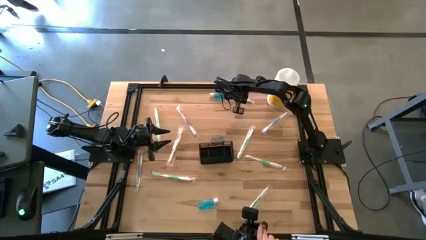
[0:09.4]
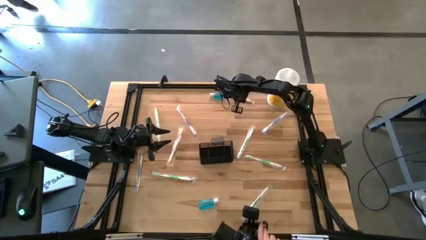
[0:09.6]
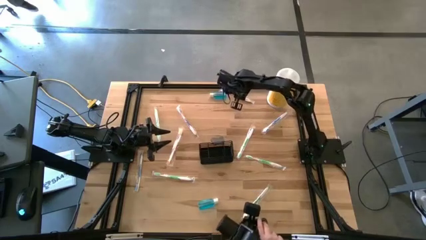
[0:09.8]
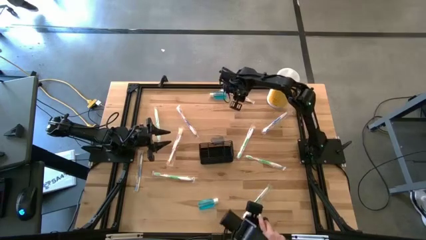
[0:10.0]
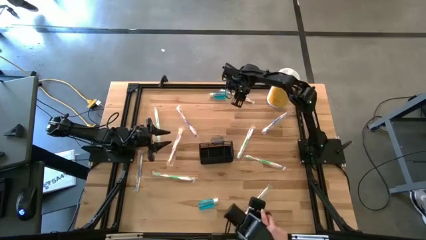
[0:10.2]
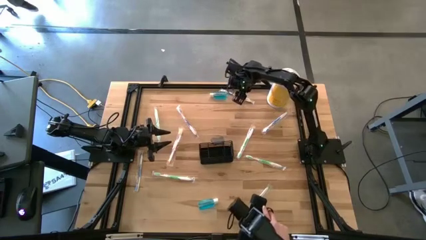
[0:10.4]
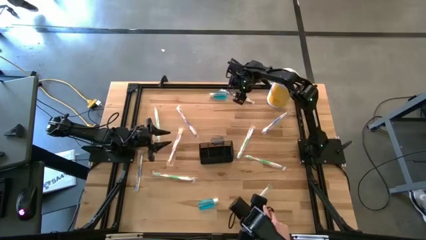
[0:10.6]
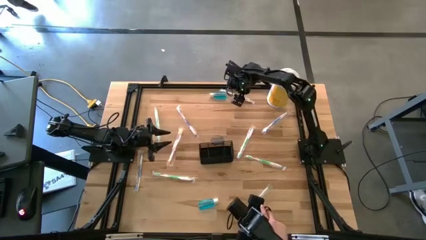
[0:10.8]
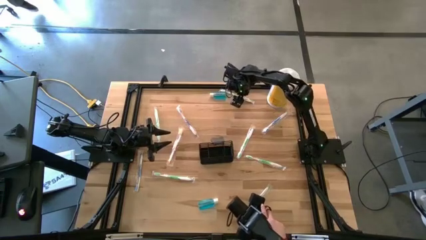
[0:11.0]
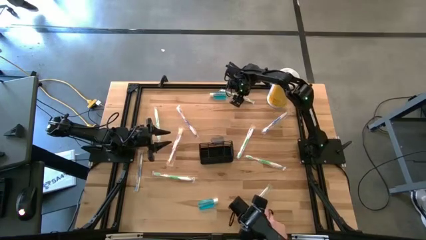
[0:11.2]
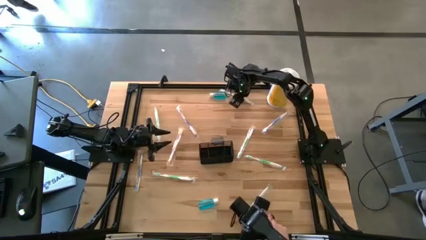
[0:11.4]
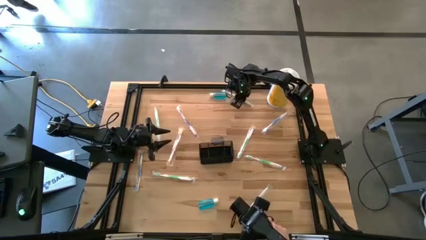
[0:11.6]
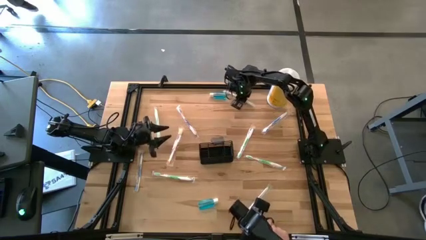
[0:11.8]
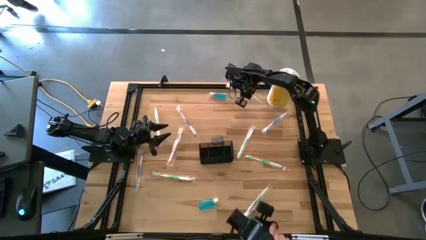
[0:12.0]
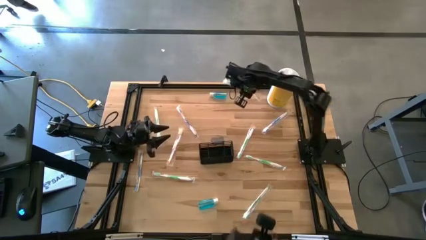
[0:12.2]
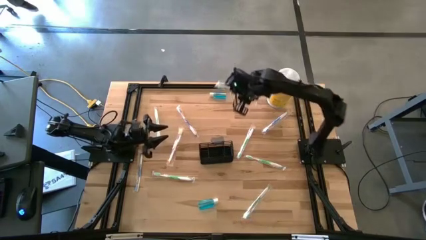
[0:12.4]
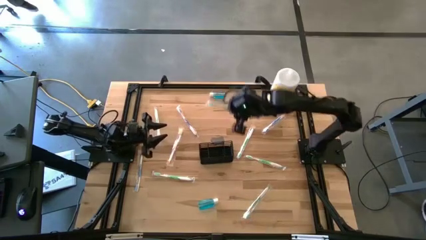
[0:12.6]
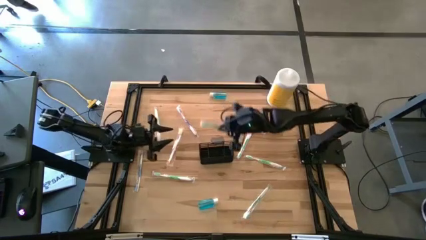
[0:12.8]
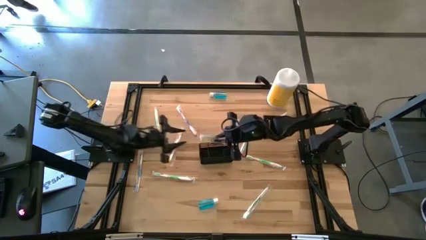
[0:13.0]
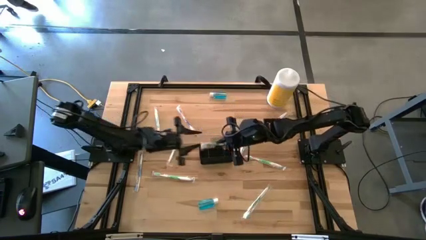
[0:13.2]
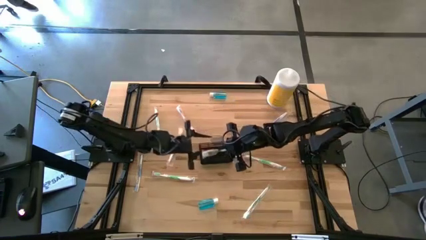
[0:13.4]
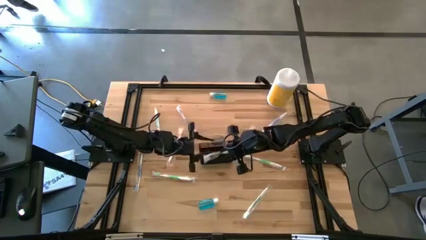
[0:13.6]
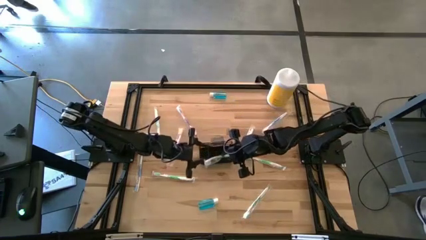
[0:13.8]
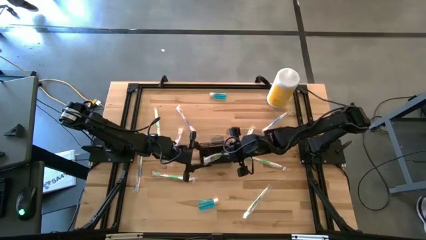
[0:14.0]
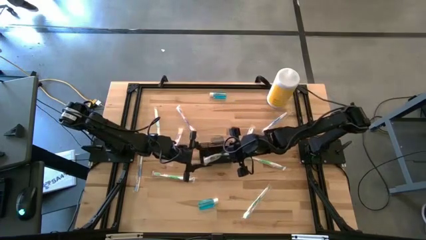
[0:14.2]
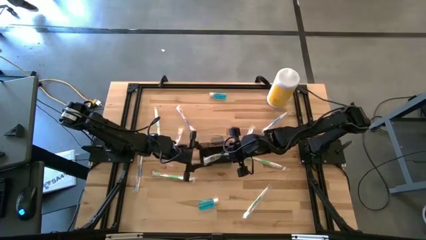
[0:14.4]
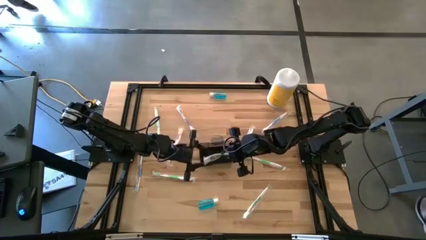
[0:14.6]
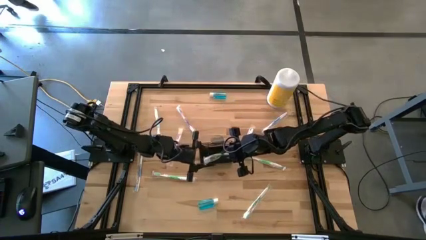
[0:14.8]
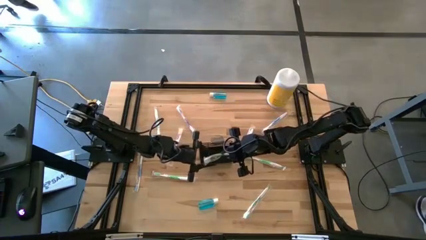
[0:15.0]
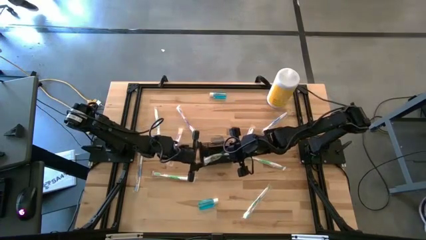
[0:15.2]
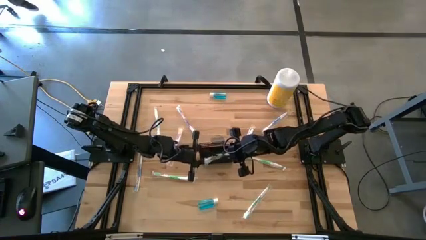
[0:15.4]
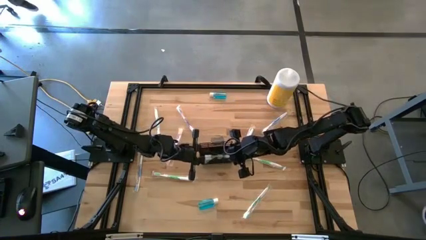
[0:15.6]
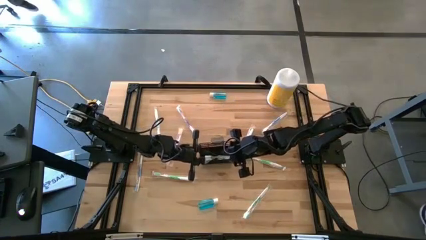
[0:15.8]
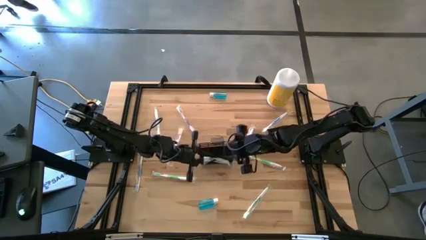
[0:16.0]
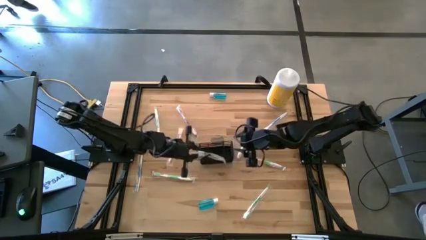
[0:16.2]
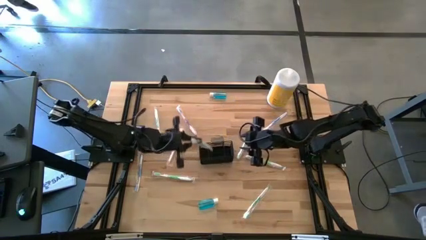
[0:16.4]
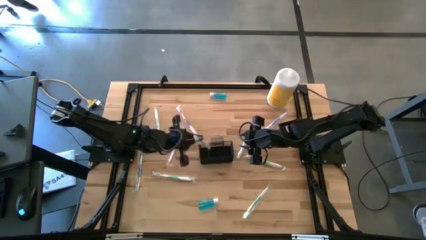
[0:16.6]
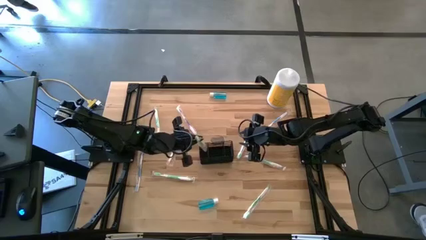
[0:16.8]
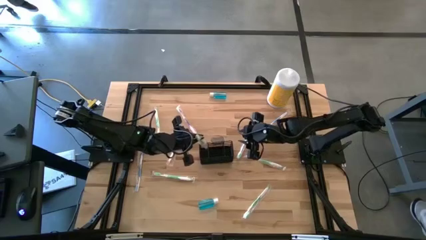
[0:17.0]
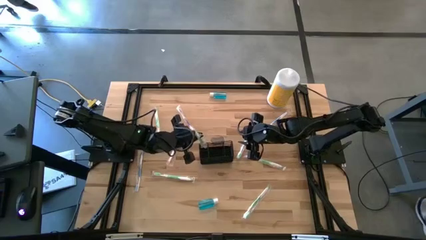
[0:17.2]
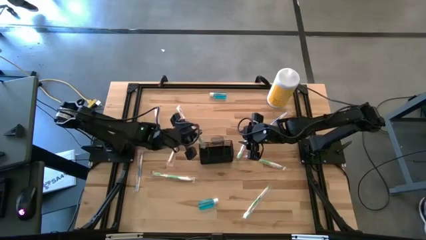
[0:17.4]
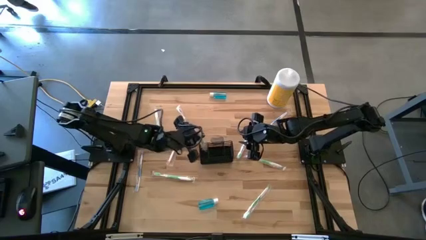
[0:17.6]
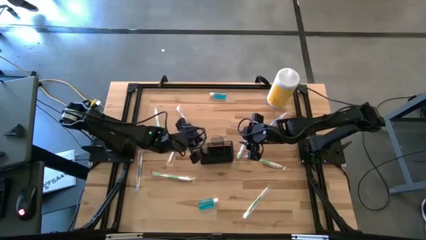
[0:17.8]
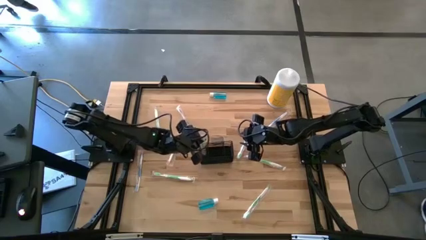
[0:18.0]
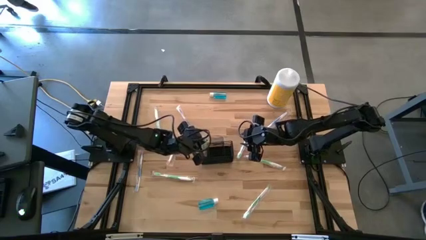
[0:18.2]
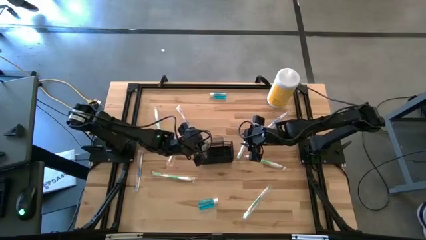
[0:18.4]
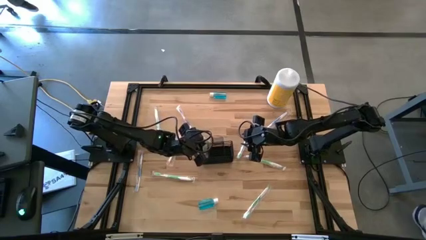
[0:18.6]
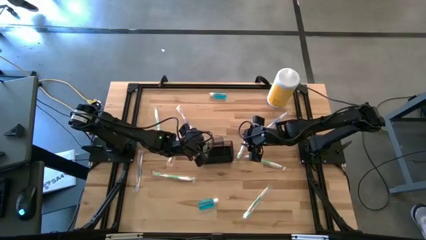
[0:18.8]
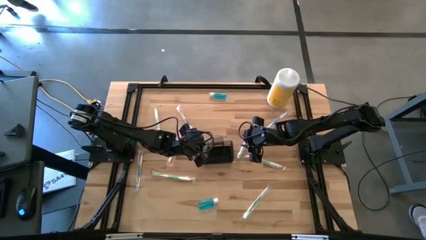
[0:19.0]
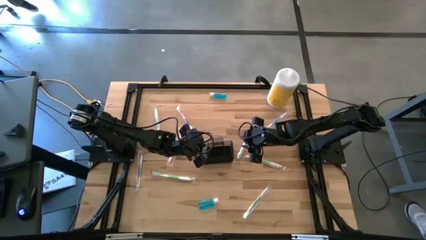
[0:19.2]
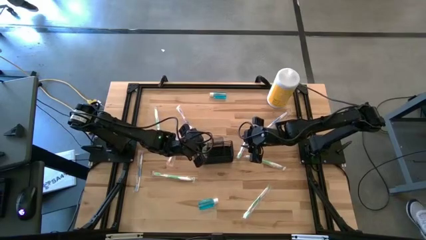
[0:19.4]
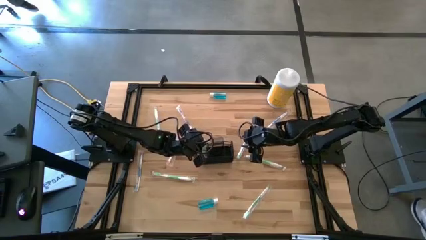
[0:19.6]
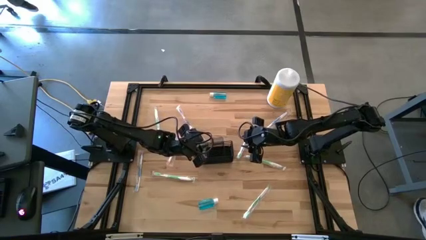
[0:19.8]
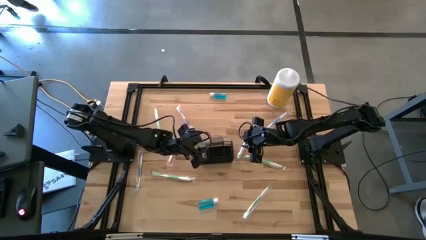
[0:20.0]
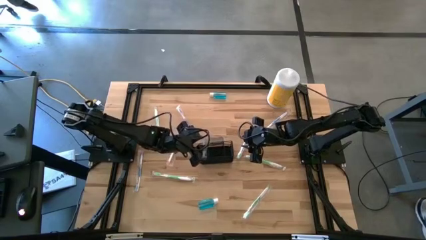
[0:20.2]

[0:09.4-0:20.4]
Task: Pick & Place toothbrushing station
Put the green toothbrush into the black mesh organizer

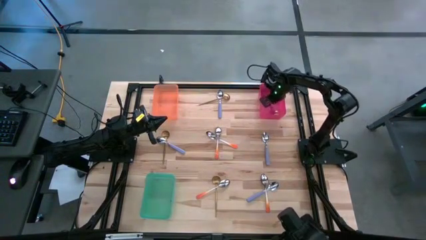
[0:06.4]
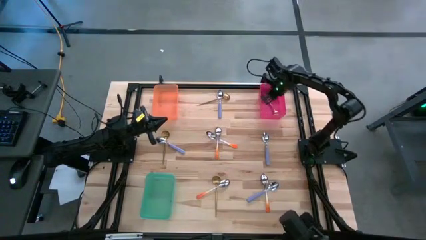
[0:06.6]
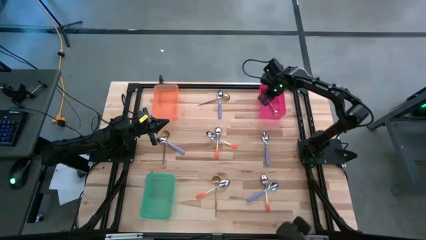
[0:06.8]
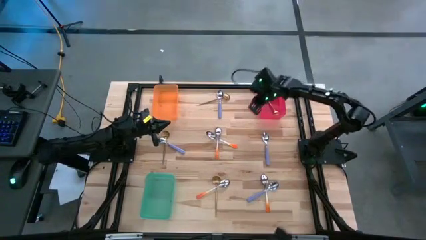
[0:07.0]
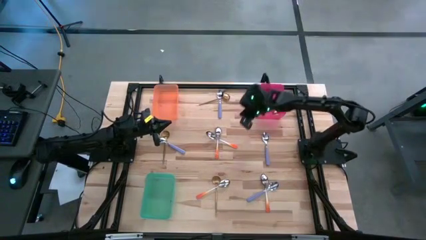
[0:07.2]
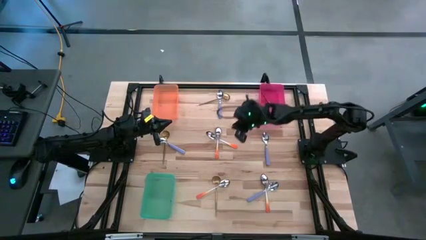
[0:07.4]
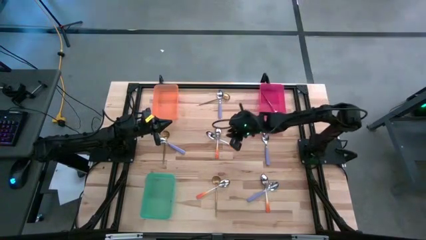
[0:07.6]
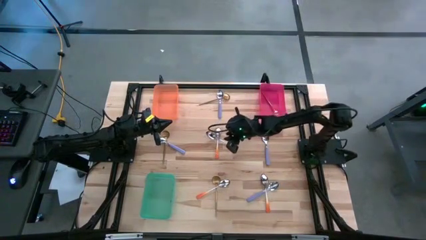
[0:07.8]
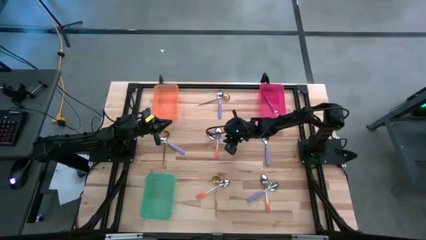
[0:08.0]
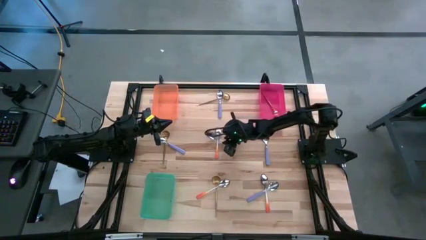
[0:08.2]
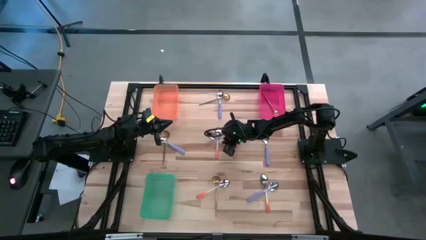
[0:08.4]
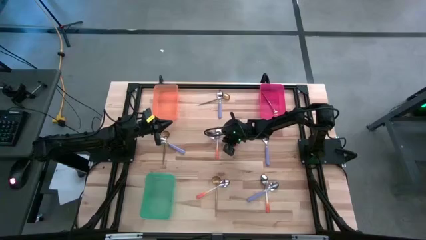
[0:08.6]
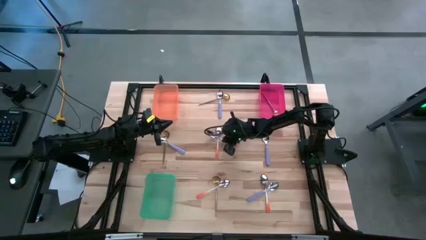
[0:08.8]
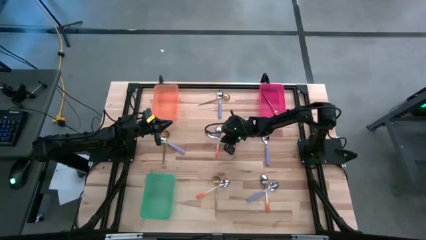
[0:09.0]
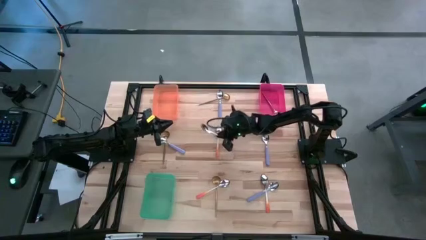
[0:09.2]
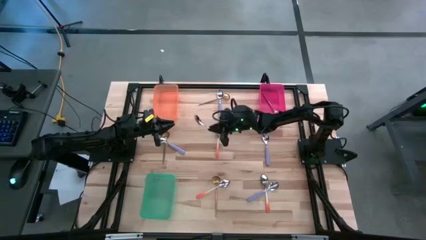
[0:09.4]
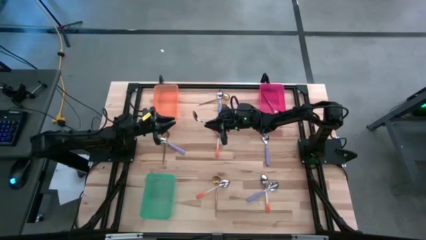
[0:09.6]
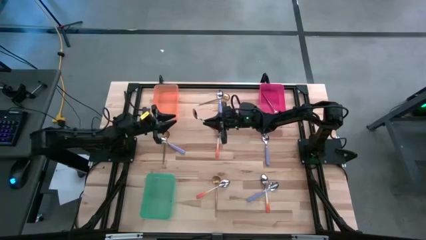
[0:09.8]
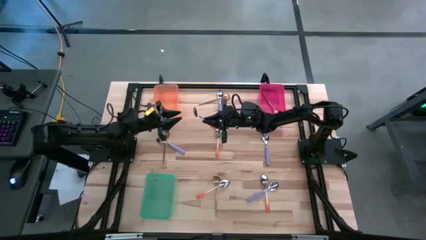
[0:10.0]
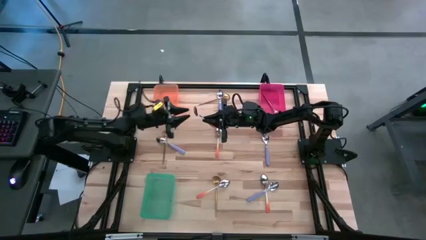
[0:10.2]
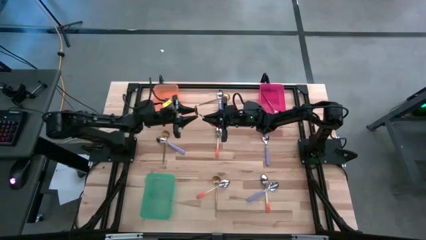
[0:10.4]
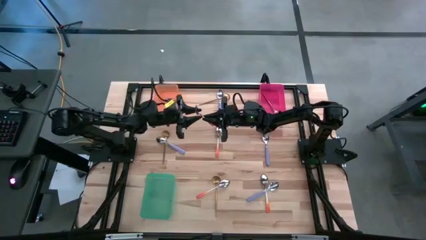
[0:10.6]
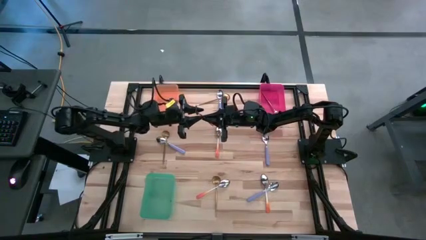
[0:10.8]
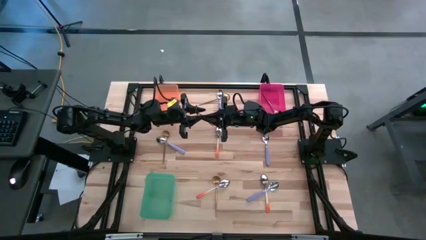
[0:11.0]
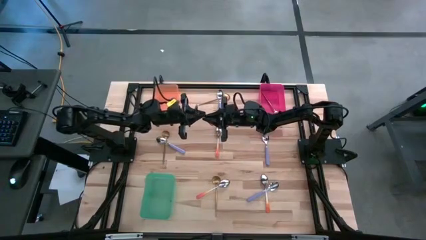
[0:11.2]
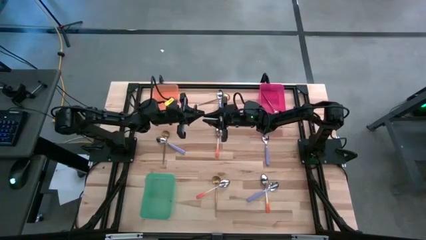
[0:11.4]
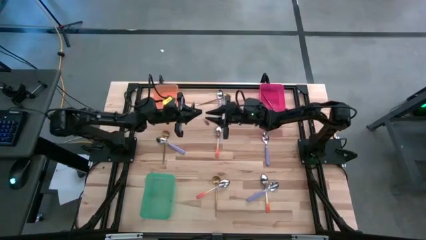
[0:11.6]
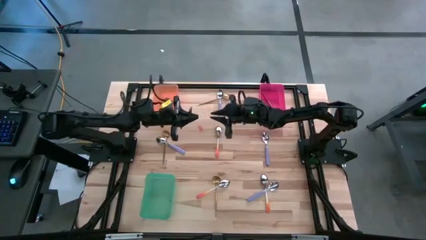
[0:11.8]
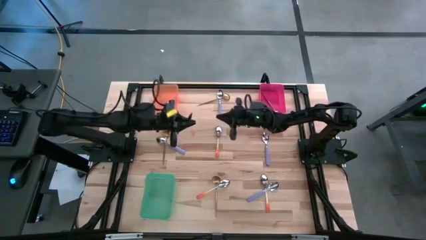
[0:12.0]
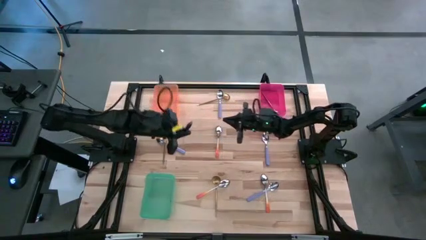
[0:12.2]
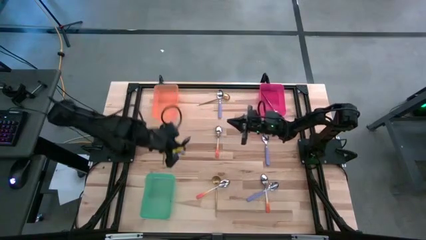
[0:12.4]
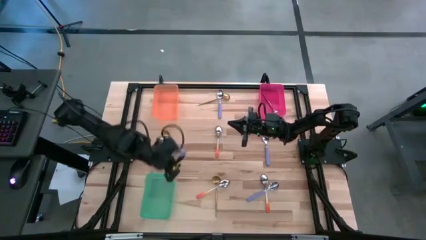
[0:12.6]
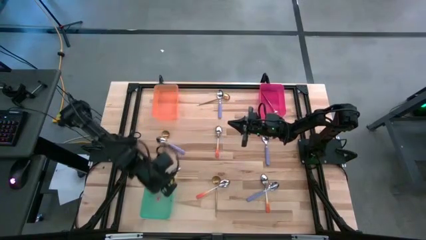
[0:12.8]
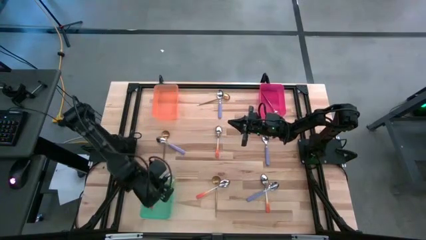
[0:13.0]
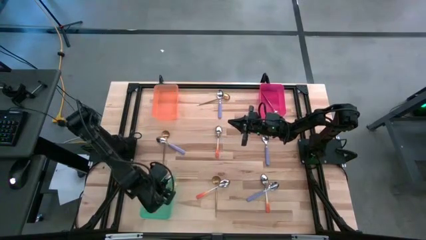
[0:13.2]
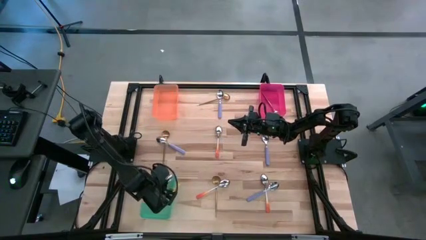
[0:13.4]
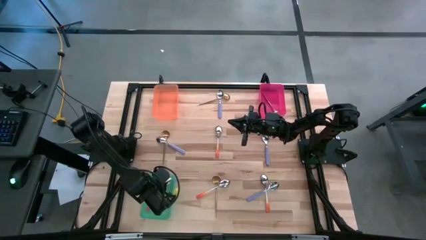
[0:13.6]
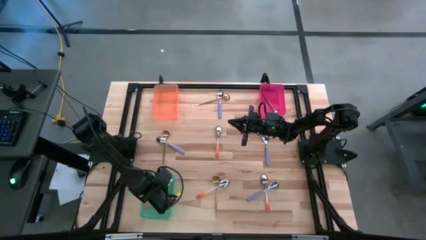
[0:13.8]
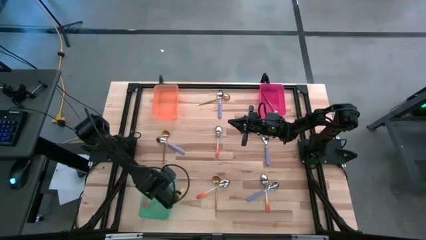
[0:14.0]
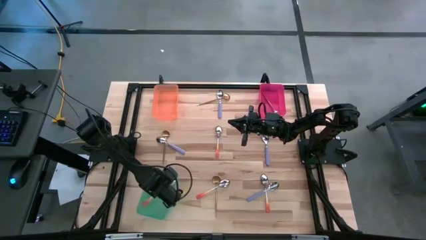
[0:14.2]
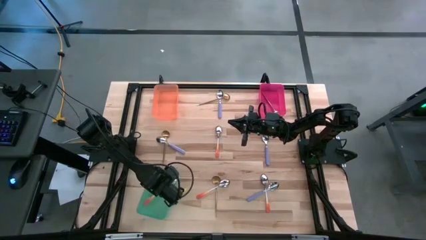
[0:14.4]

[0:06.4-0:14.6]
Task: Sort silverware by color (type)
Put the orange spoon into the green bin
